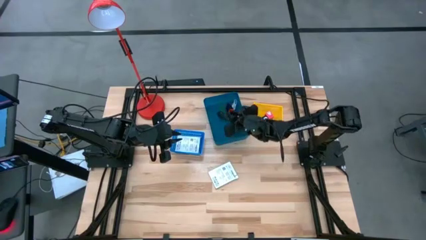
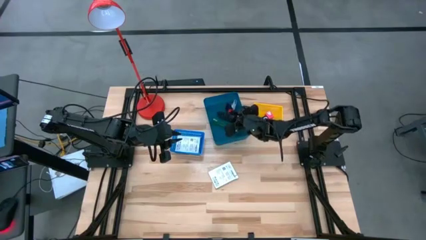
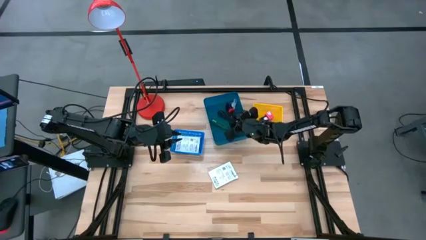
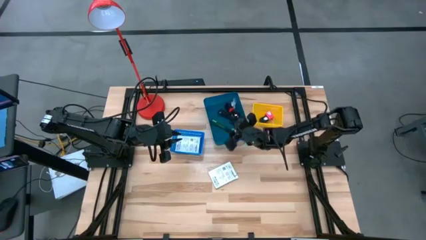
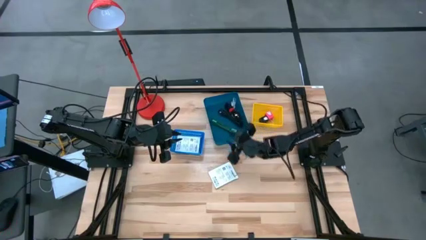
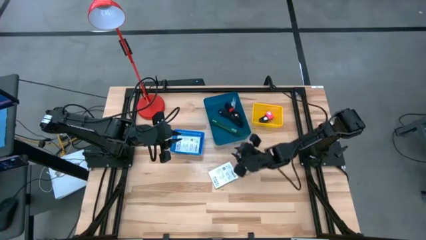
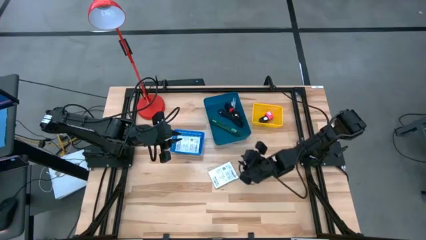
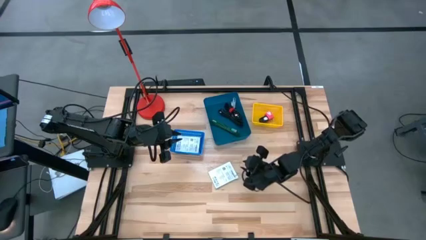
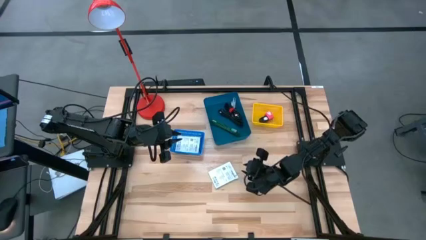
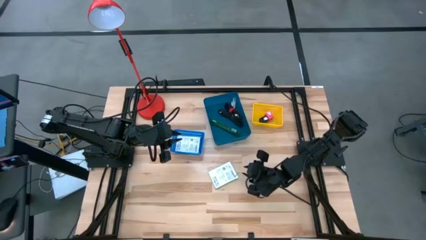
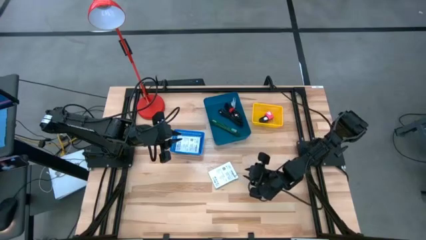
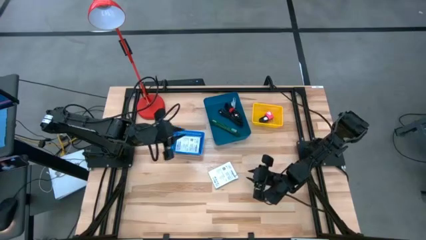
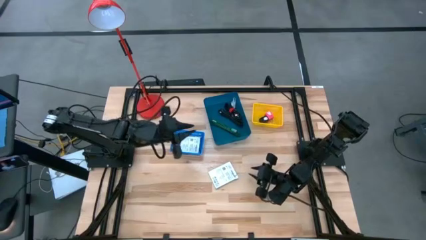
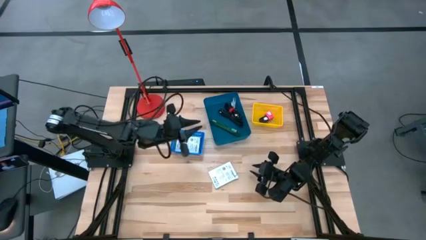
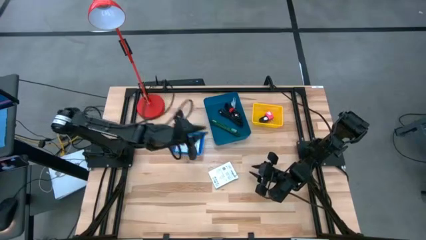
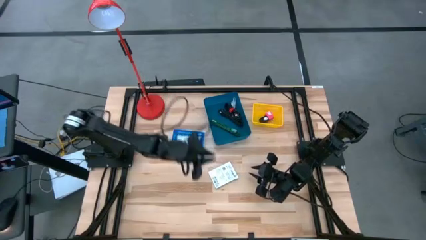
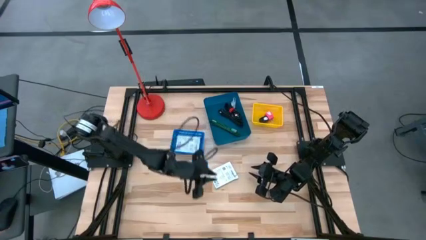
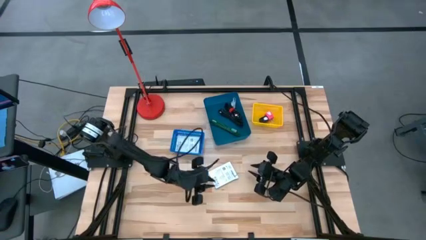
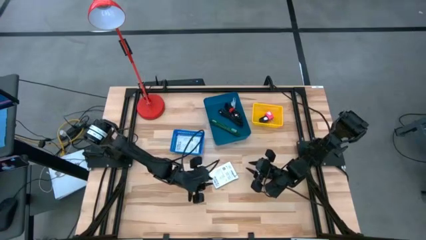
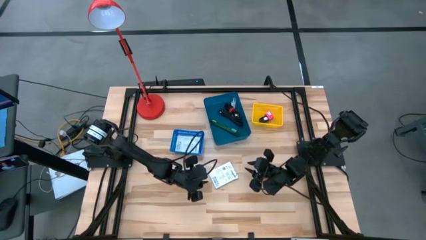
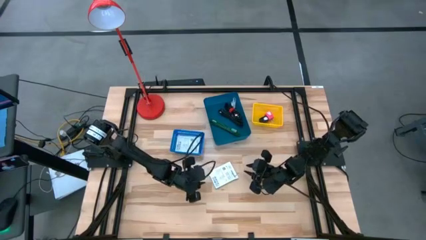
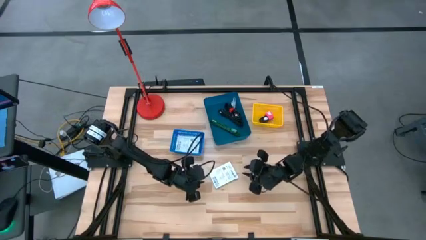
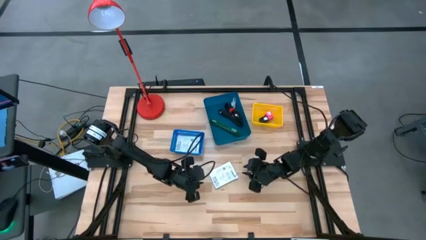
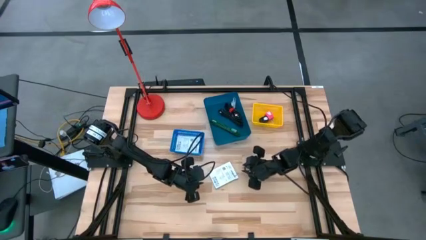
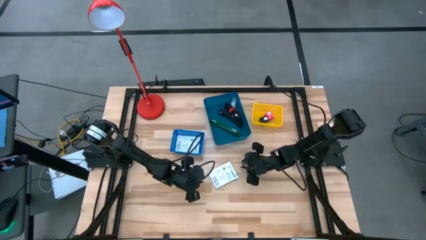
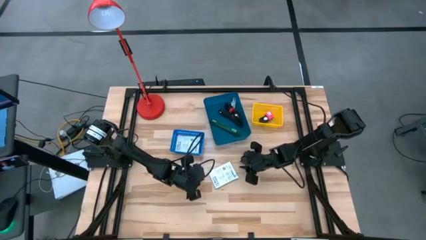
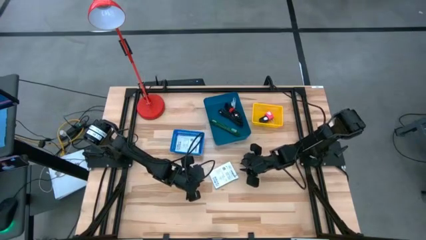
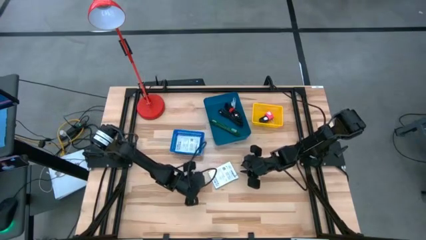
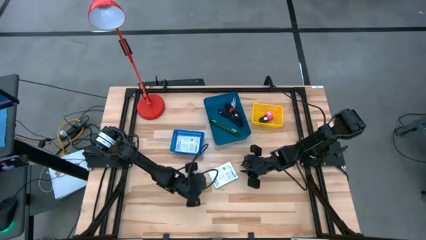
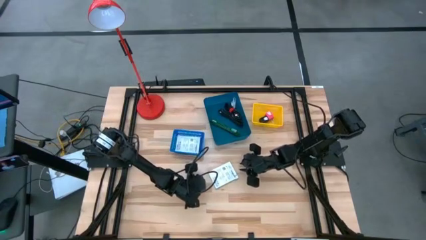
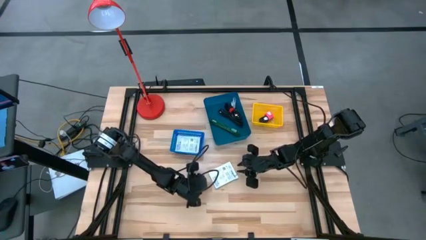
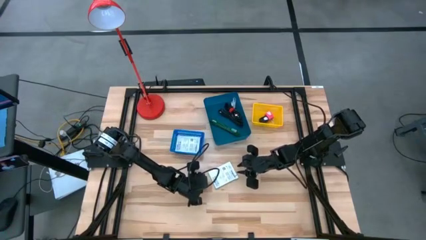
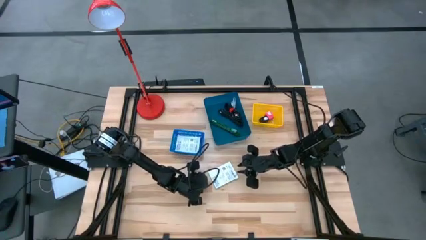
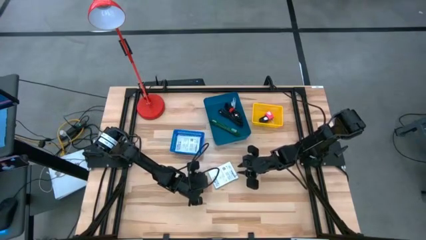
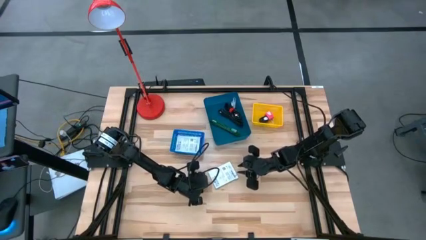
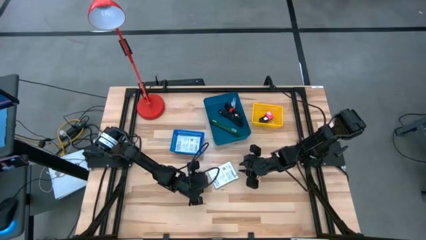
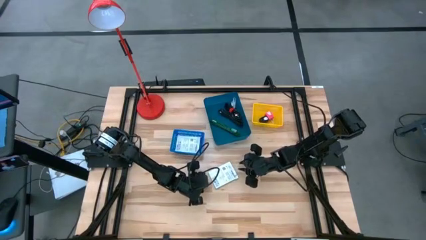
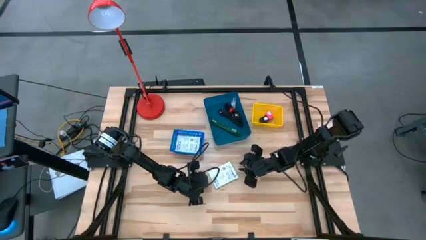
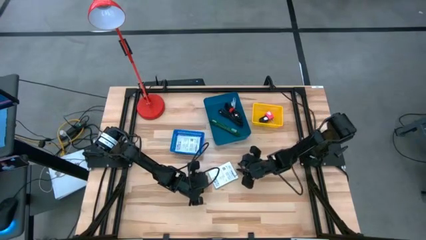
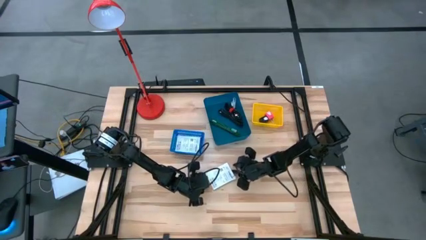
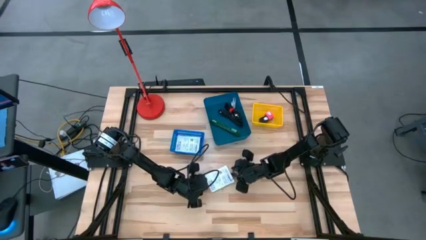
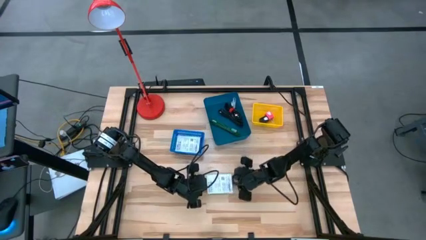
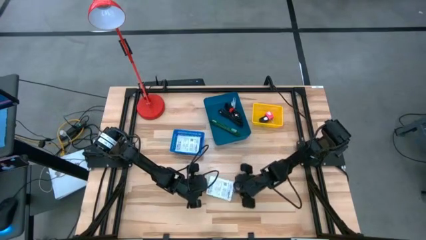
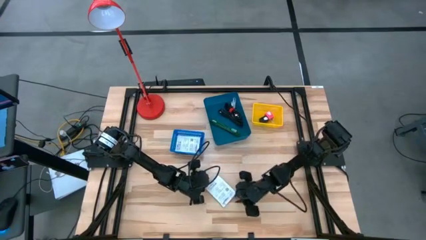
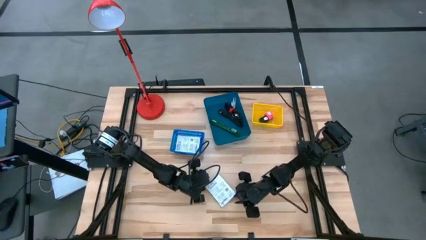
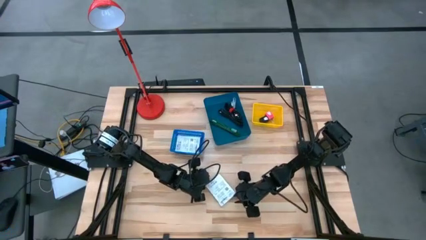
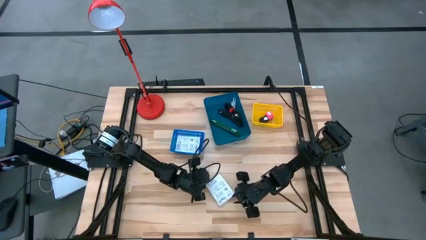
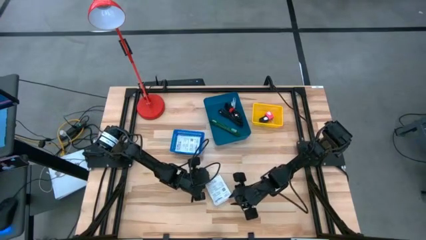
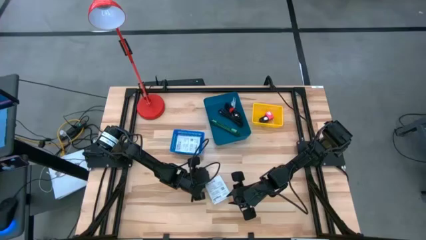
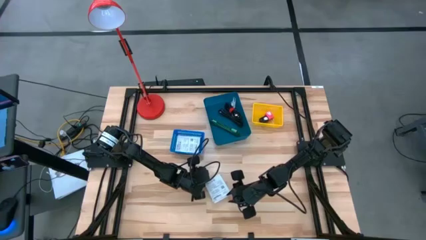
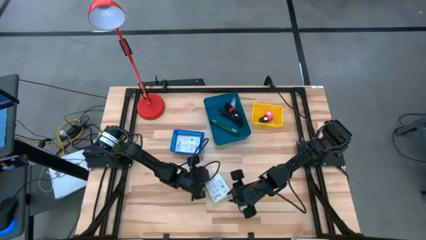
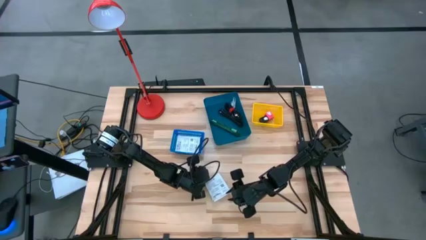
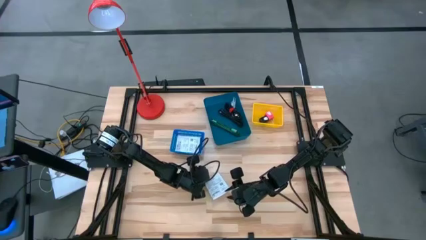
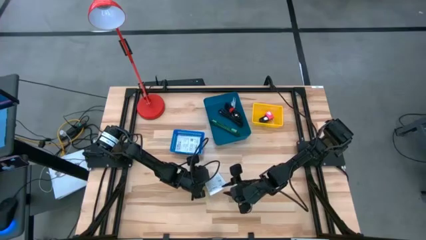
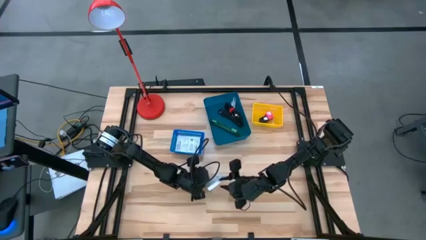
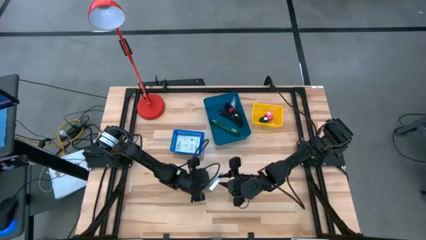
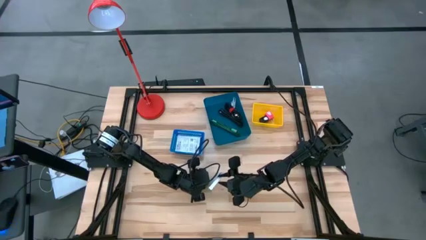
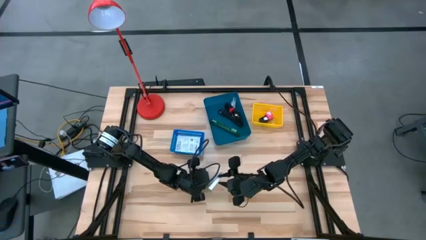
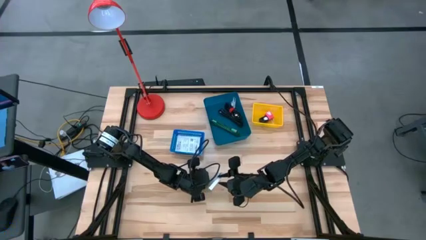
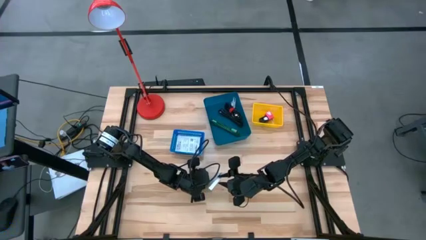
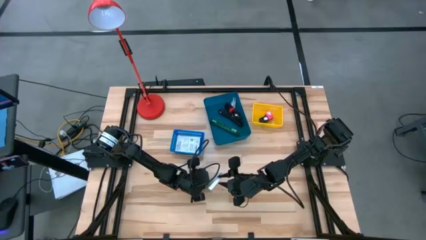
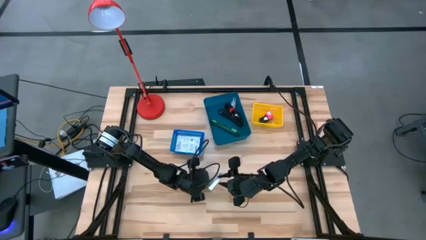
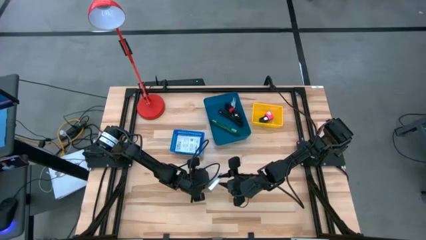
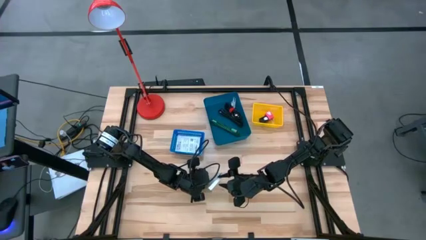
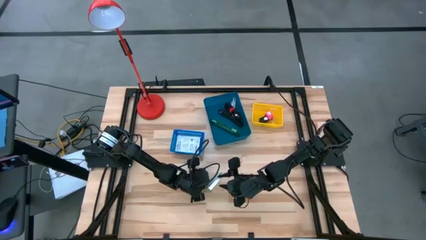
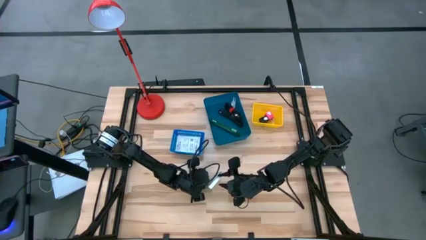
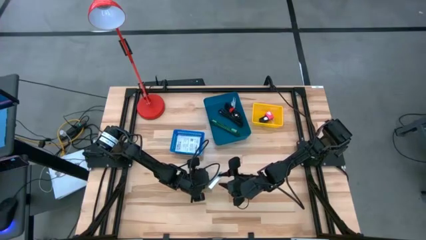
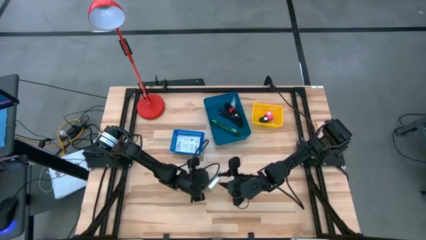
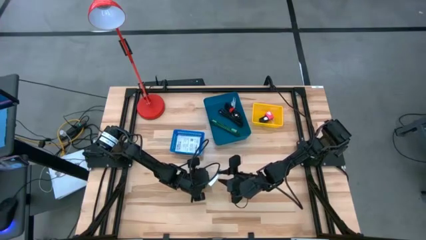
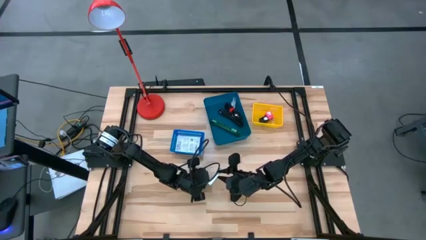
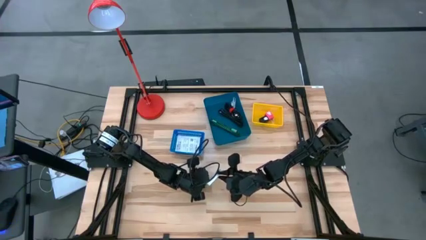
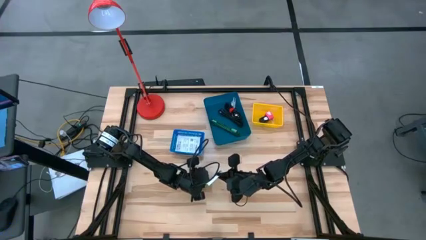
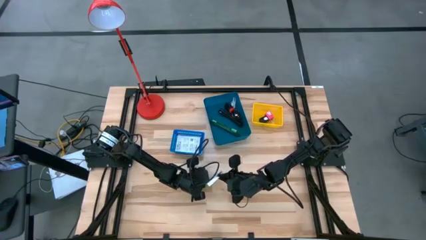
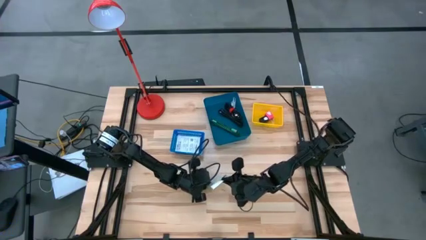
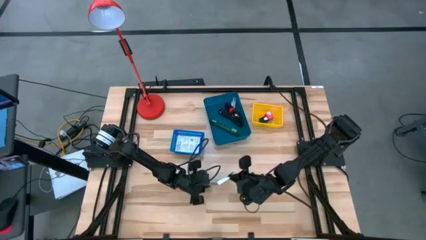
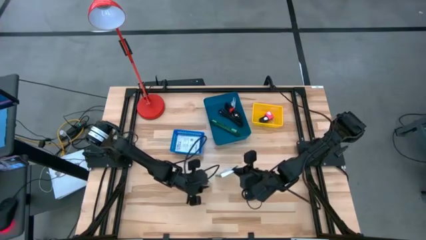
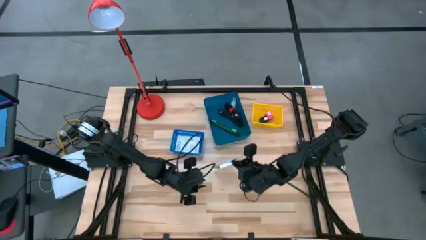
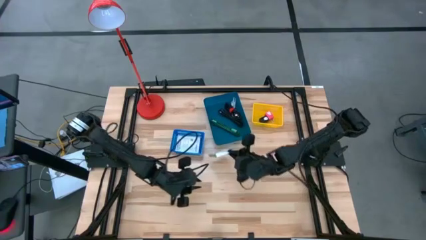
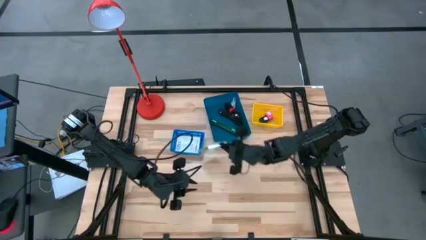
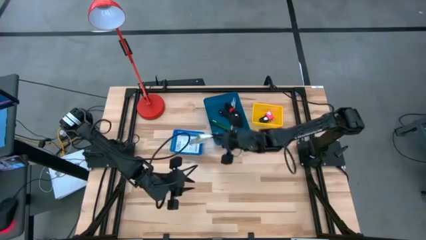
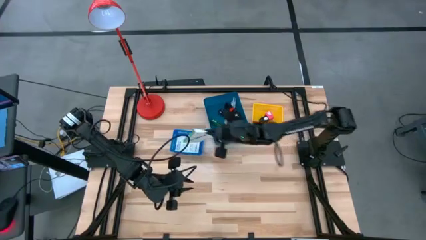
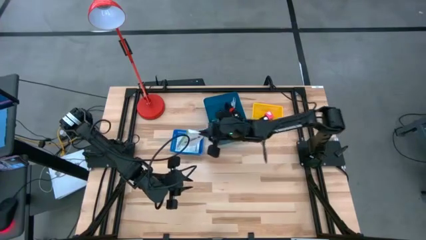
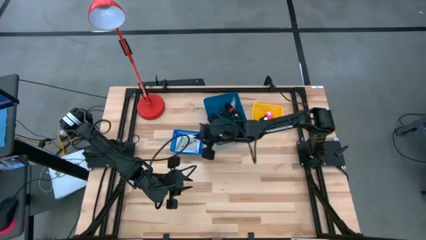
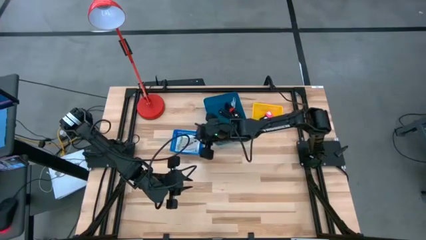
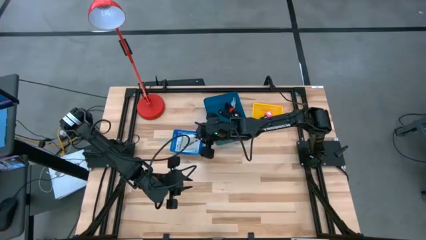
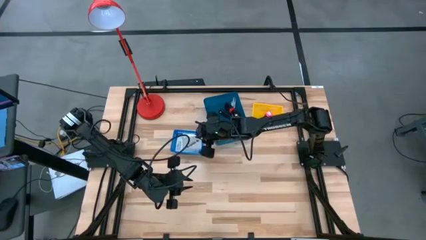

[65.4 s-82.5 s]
Task: Pick and place items into bin
Put the white card reader box into the blue basket
